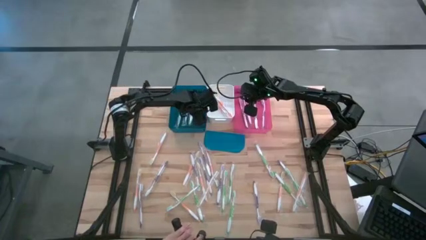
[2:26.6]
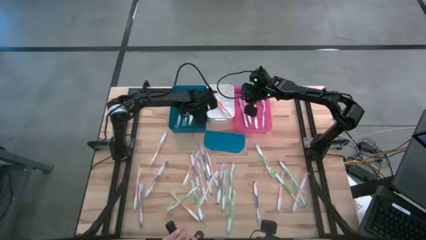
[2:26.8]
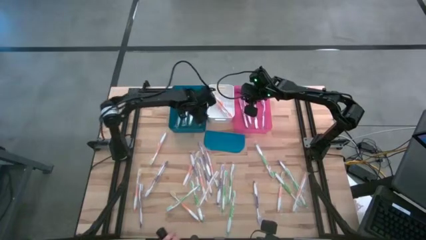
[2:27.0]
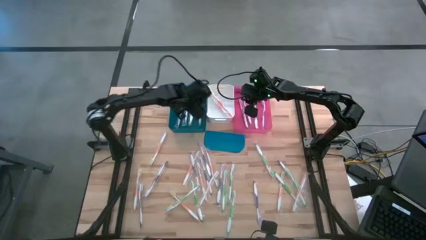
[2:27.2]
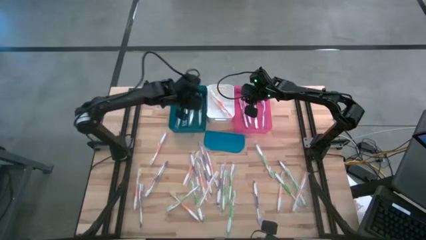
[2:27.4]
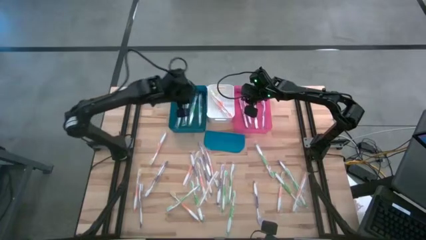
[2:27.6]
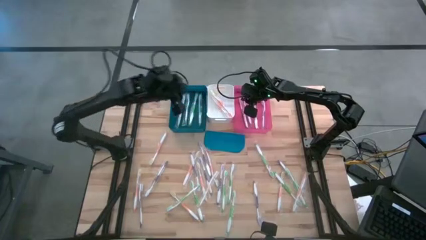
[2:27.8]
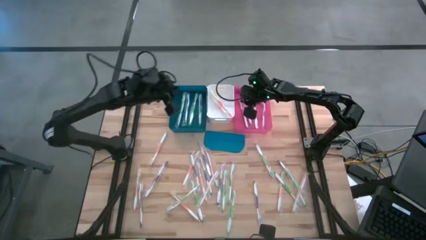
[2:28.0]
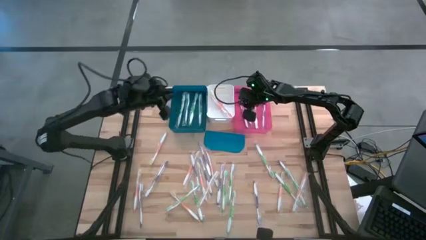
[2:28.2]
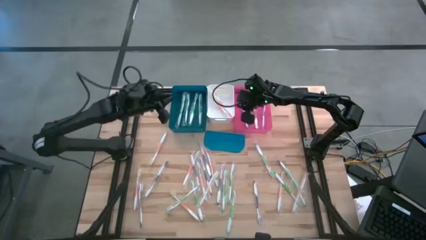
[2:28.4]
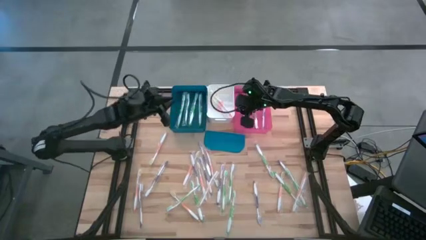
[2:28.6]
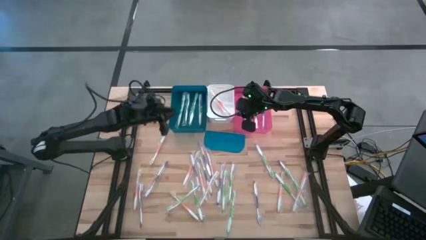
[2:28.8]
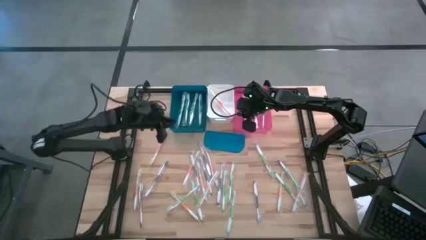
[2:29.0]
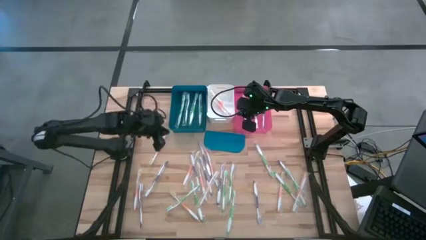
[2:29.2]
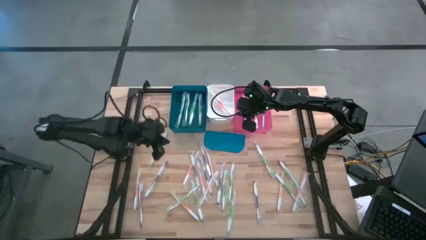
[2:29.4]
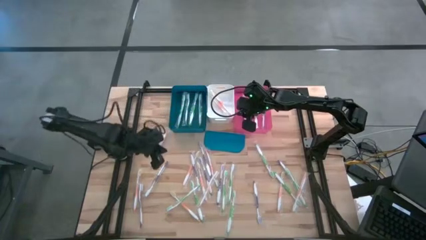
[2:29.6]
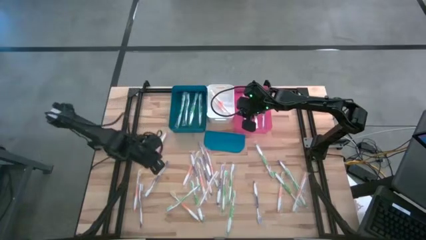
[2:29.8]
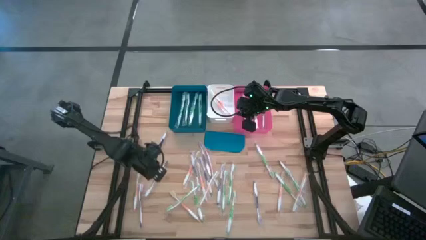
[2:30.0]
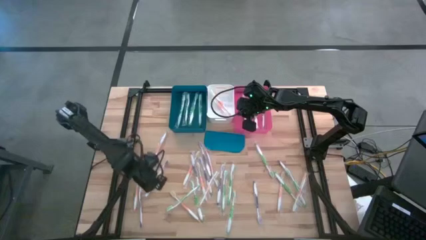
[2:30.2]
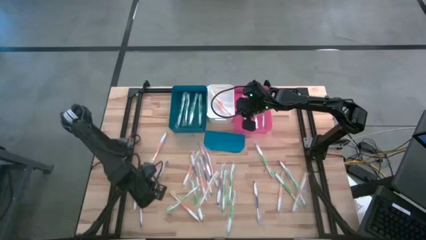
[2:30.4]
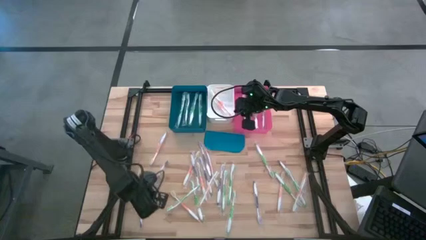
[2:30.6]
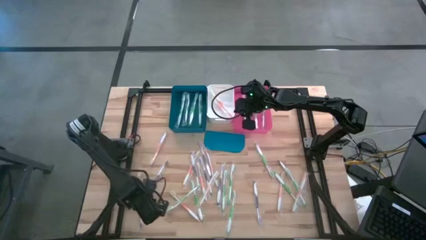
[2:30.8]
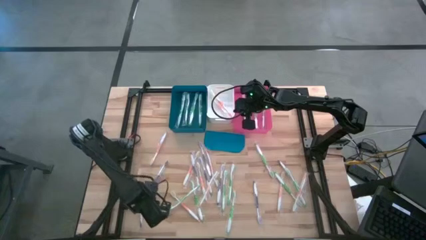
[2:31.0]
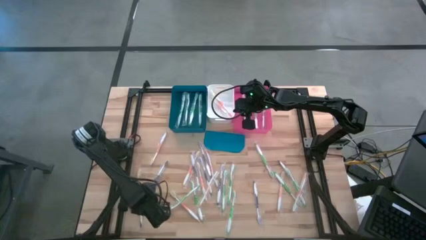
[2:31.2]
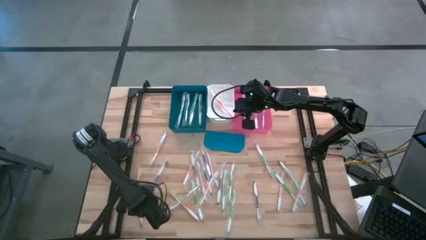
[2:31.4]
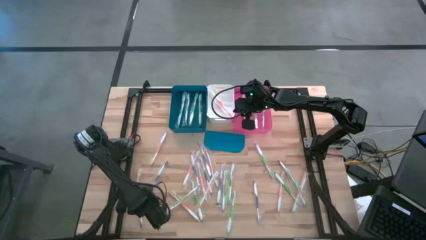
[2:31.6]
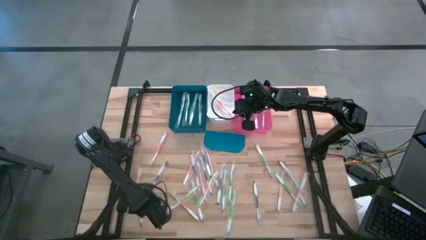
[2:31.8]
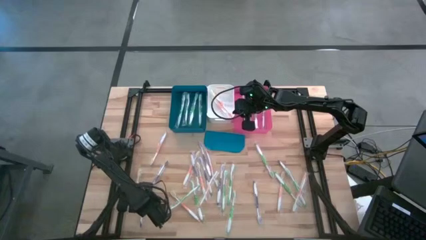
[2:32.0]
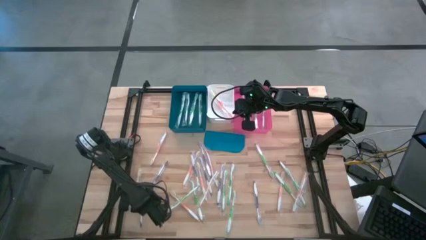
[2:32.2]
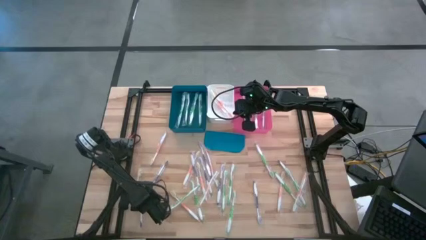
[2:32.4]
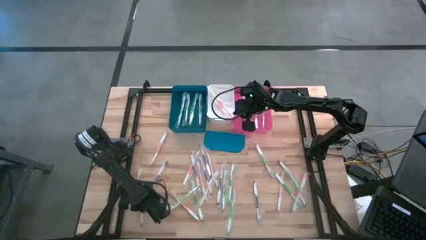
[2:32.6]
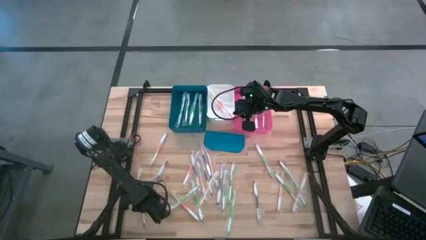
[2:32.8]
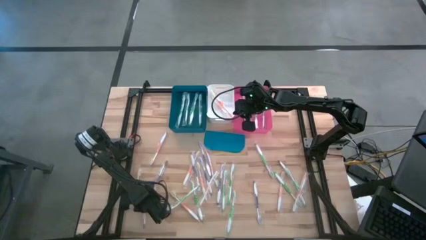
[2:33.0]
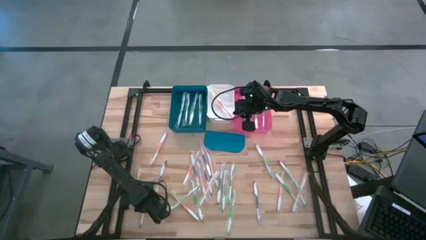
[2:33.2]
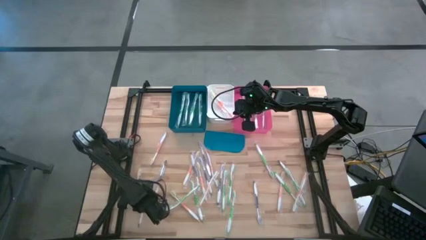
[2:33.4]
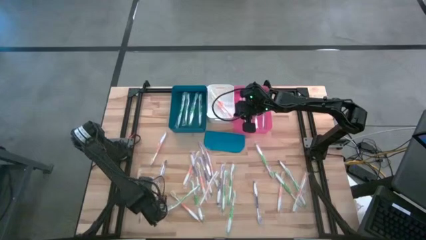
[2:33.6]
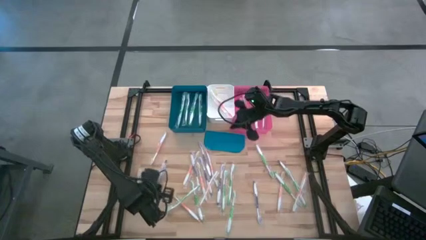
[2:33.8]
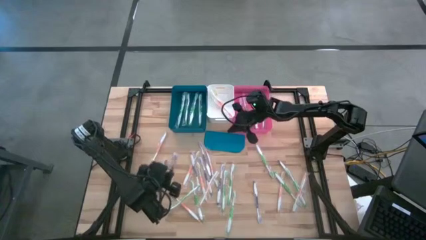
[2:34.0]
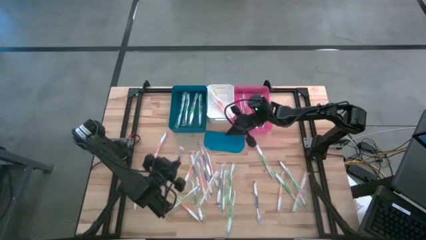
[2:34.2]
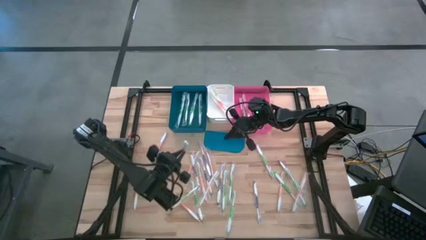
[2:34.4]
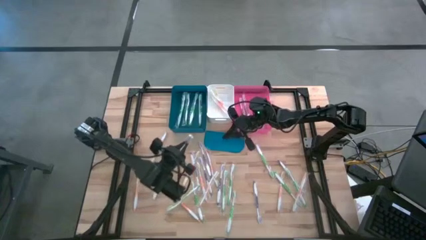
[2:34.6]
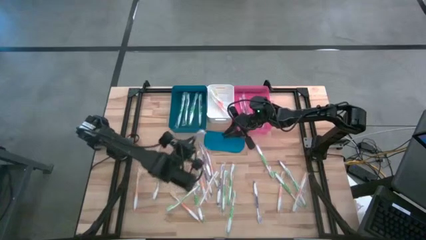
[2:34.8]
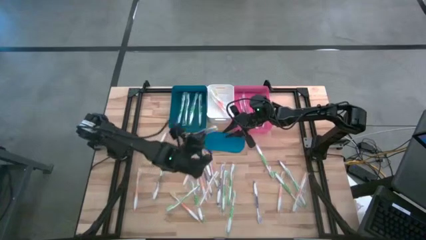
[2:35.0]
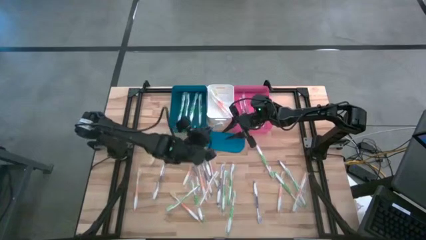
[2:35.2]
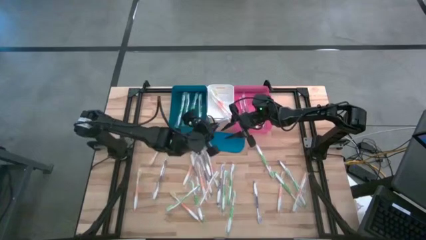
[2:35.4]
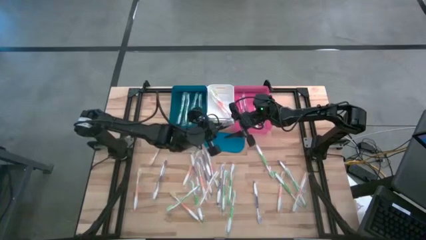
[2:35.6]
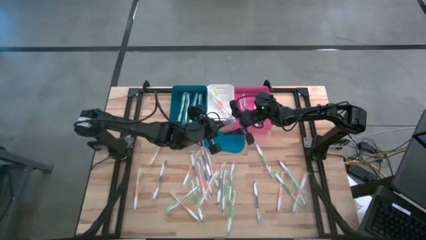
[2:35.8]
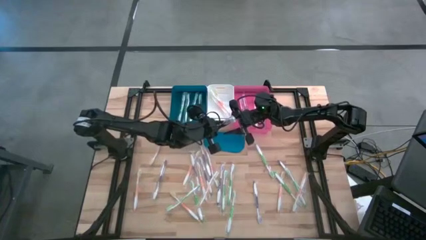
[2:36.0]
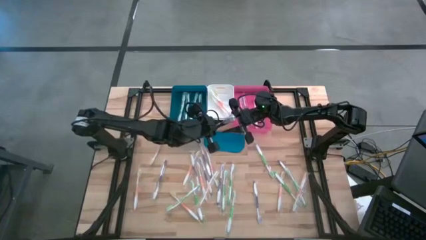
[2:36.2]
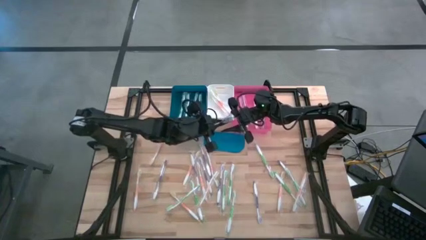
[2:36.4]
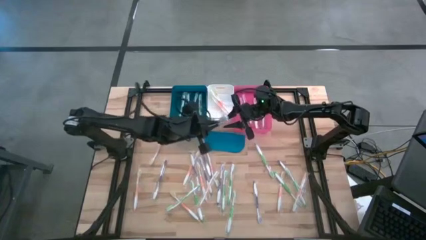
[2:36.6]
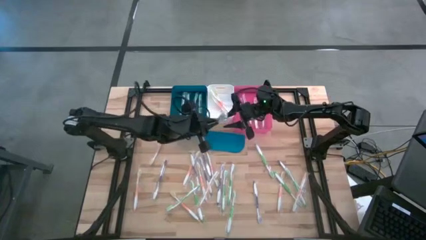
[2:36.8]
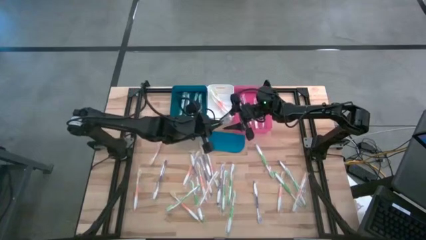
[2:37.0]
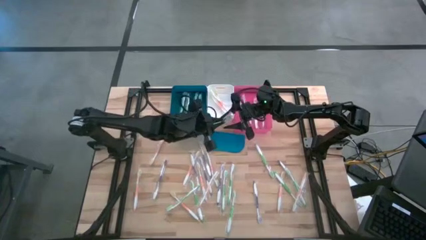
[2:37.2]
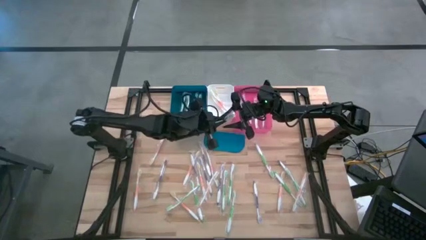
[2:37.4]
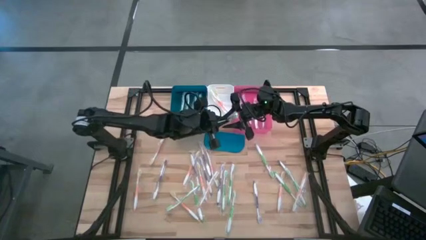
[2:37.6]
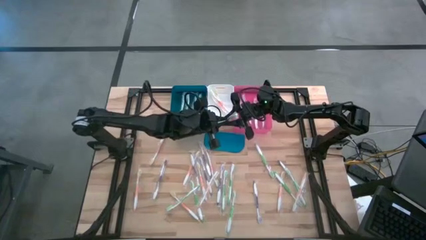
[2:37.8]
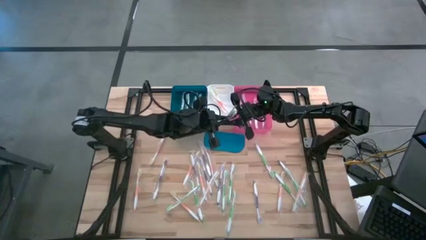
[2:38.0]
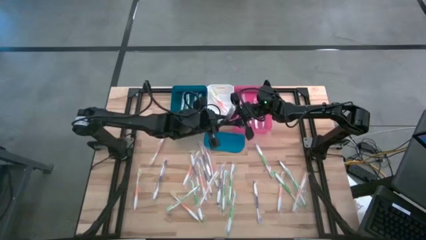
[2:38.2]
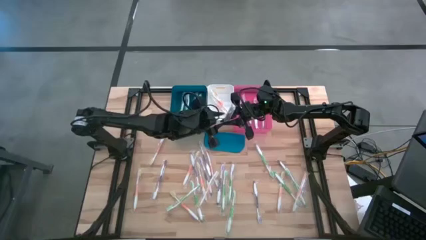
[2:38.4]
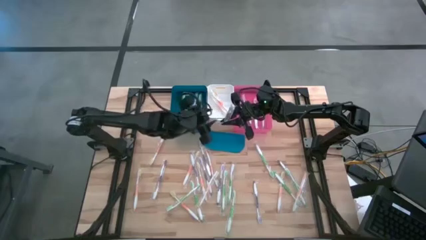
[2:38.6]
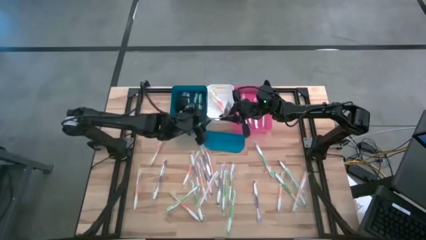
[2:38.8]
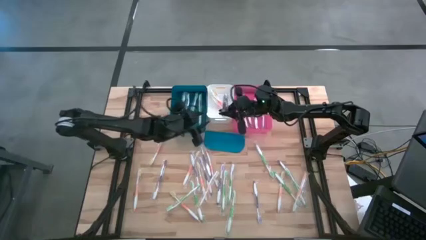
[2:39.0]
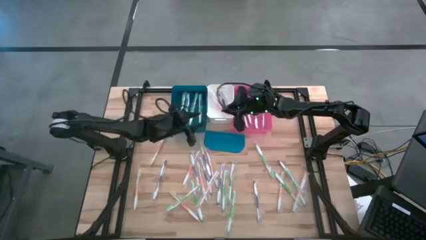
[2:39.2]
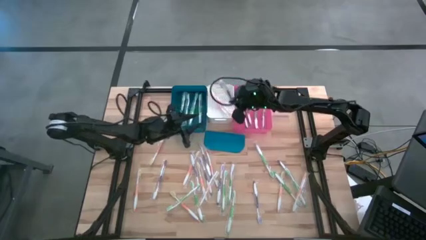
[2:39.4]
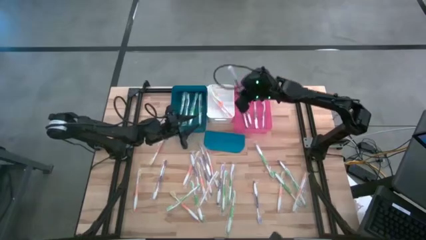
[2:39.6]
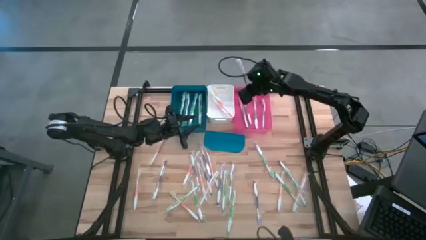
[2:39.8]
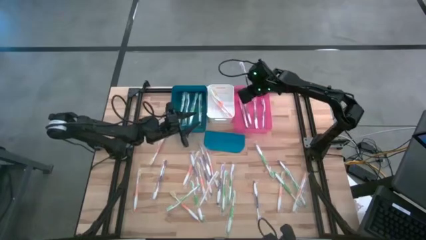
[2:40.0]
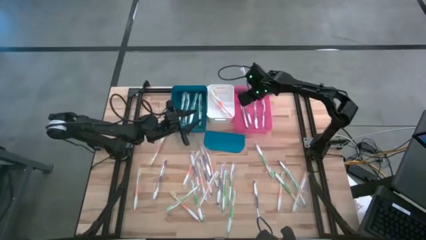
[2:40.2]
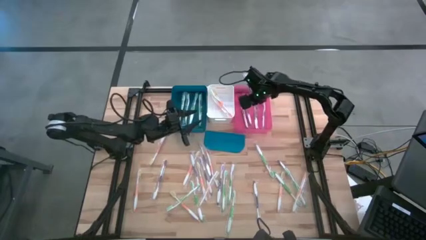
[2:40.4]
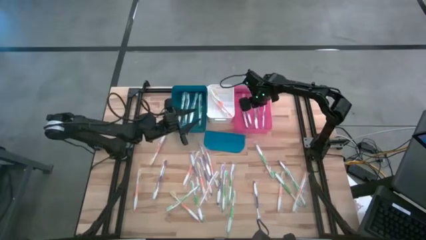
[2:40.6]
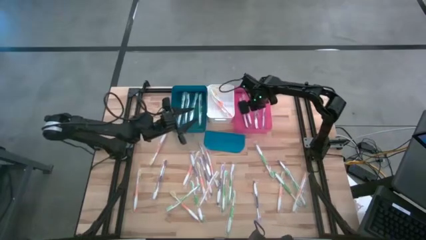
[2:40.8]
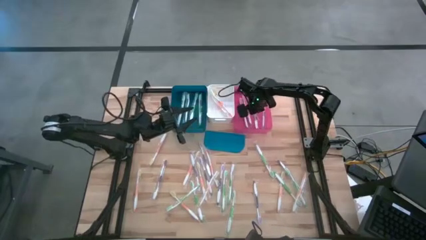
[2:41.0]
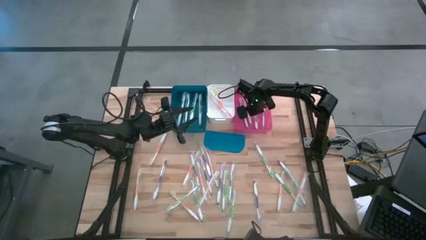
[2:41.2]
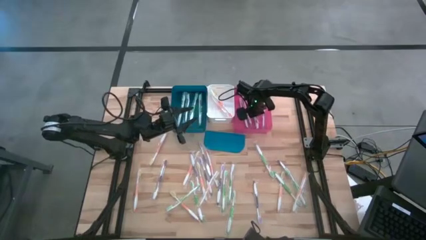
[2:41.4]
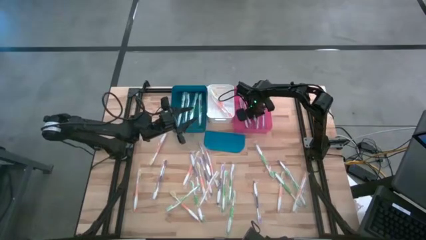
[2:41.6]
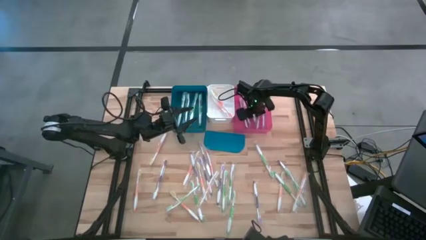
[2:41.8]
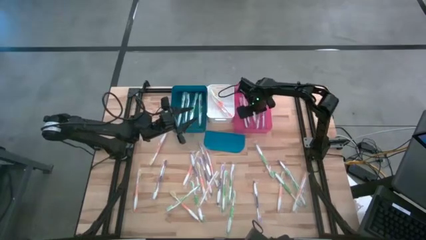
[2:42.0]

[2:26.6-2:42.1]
Task: Pick & Place Toothbrushes
Put the purple toothbrush into the pink bin
